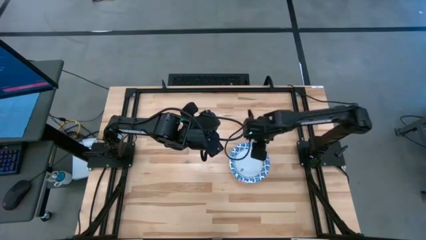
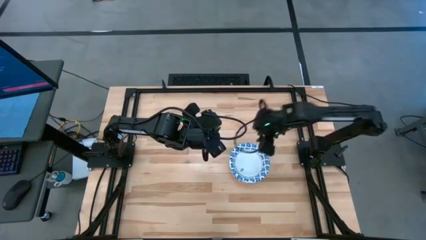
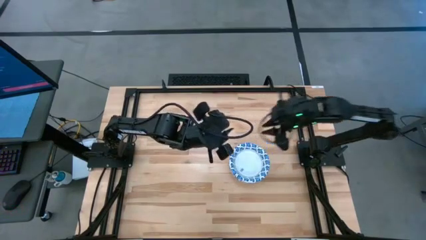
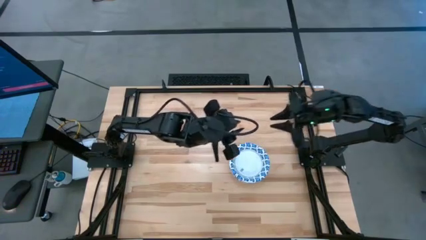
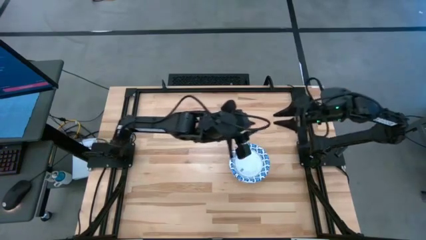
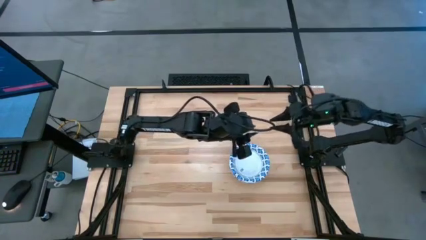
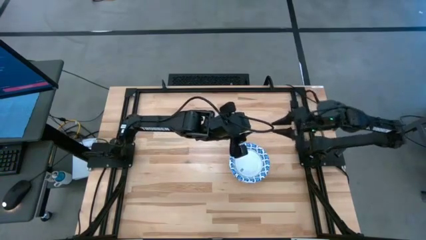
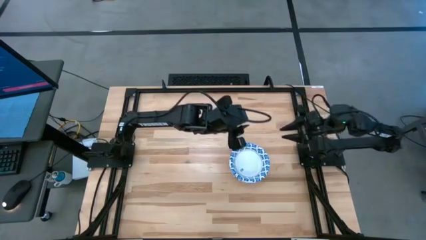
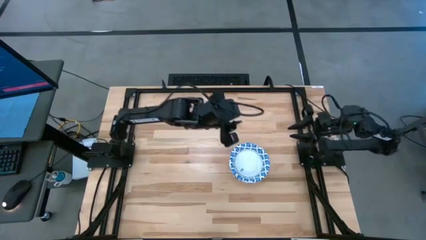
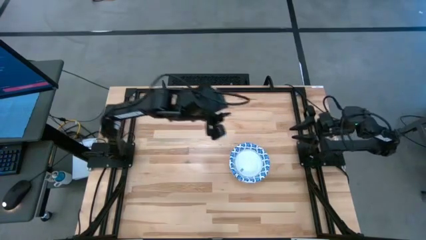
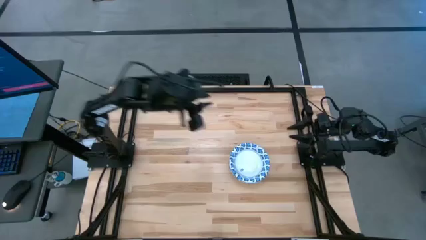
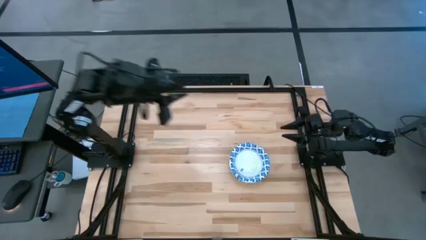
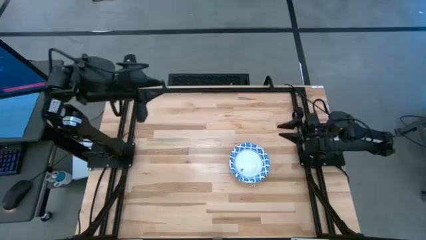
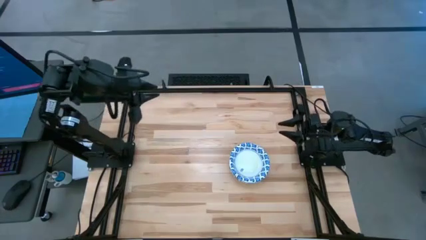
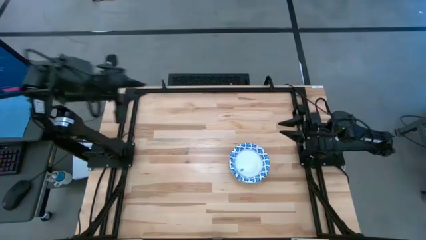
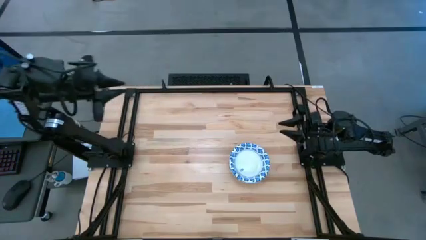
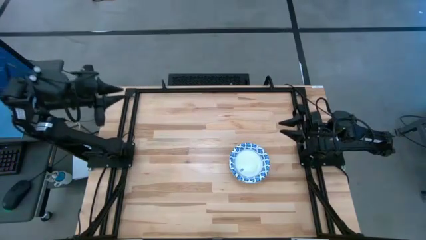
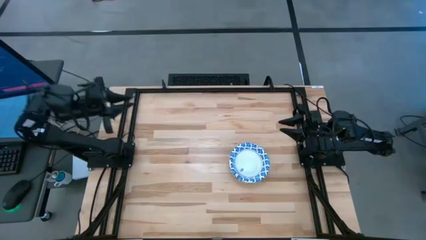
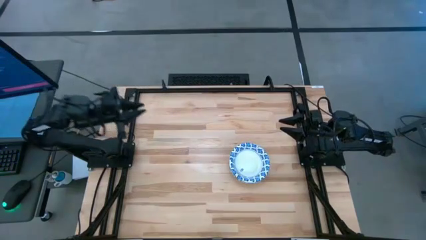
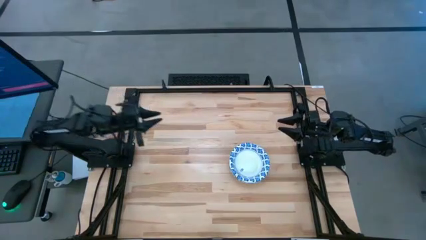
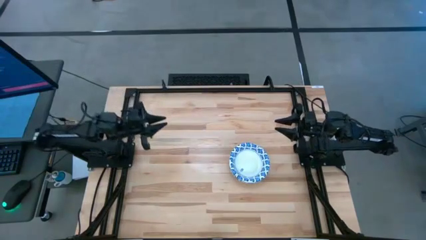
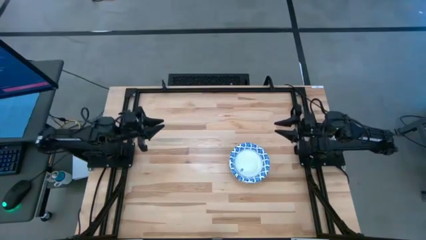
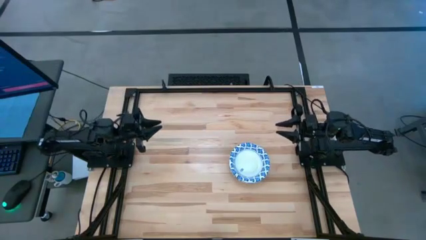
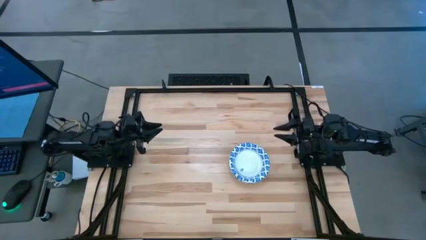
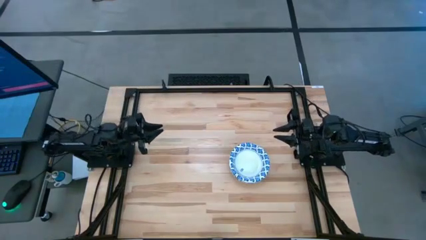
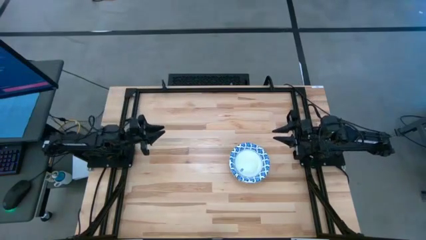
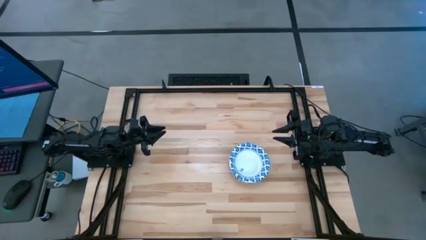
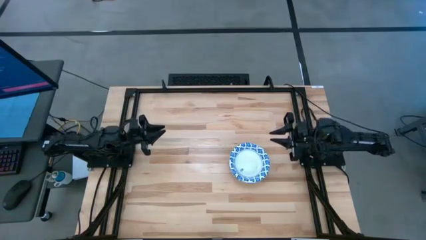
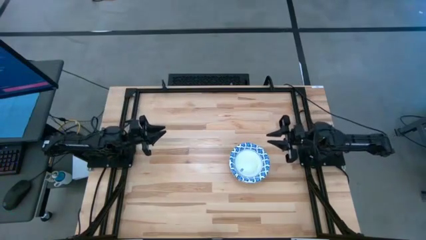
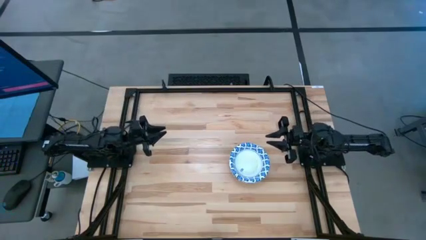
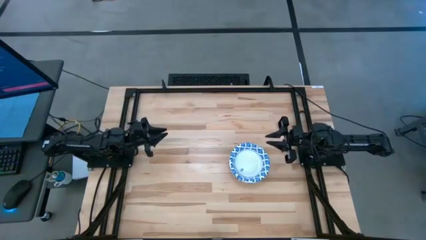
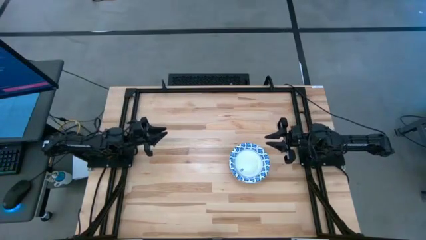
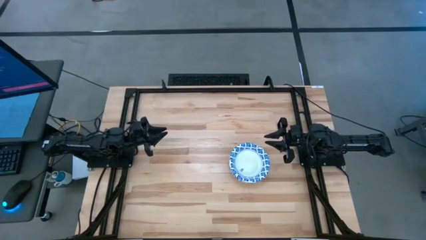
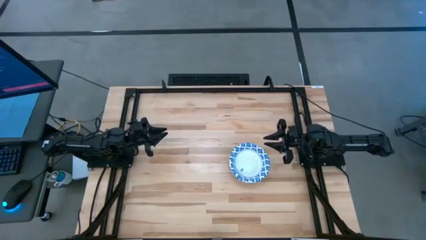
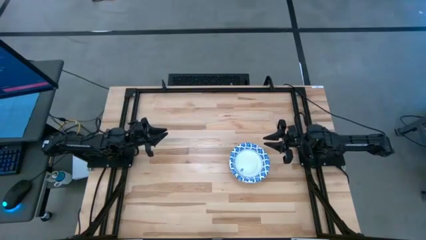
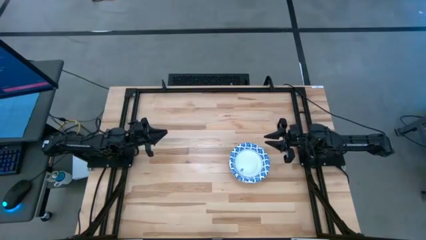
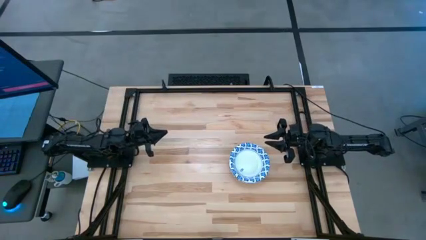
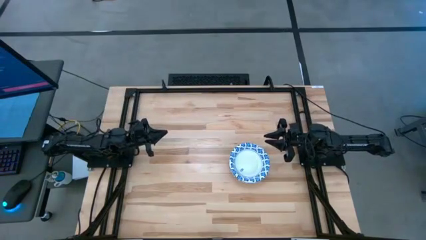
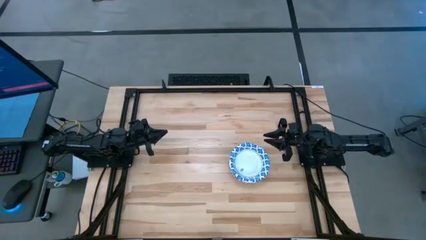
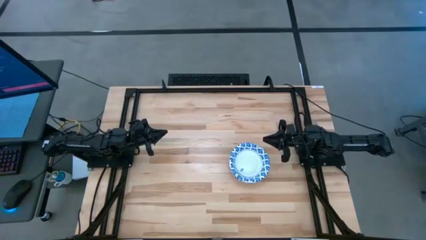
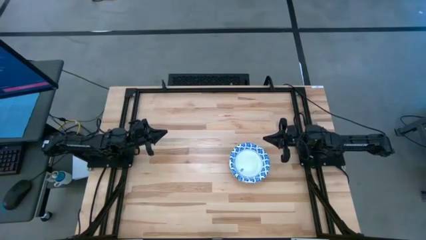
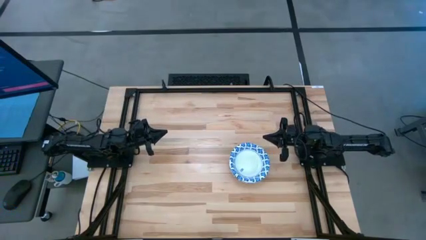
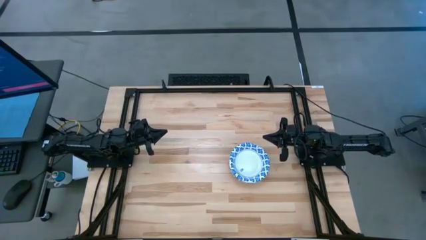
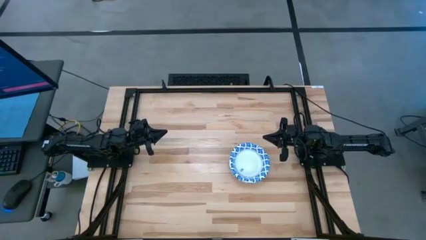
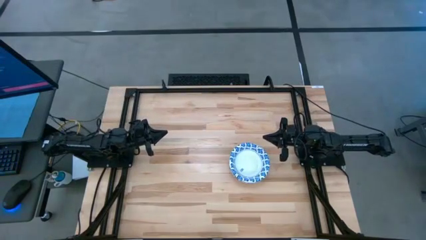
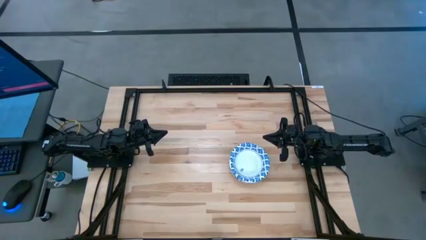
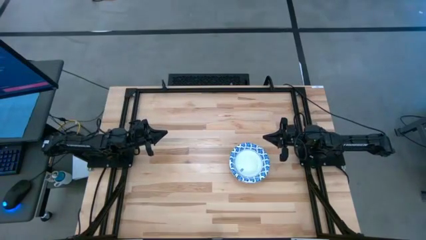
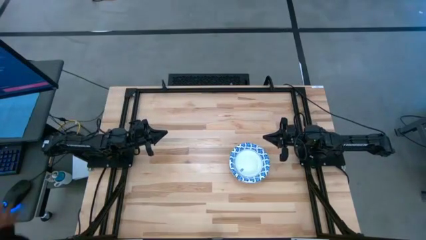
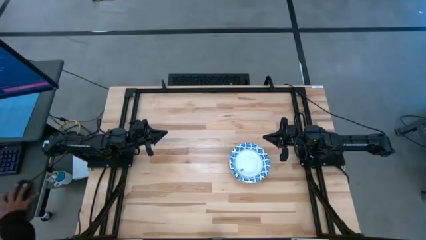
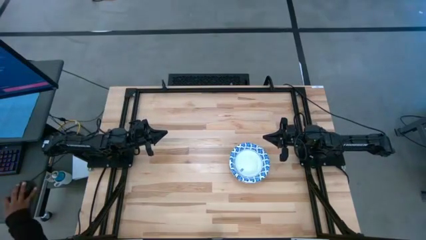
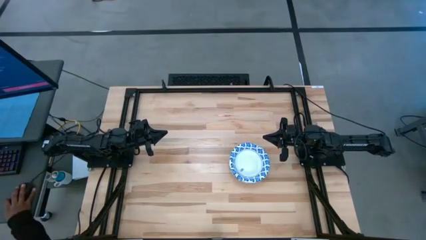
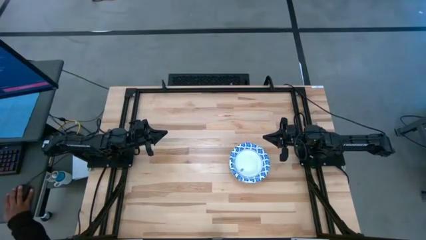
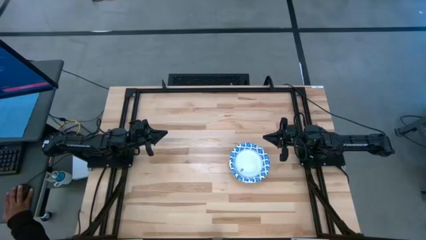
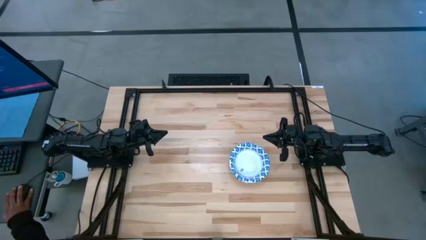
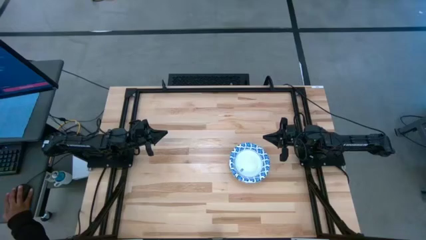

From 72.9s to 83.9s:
Task: Nest bowls inside each other
Return to Home Position
